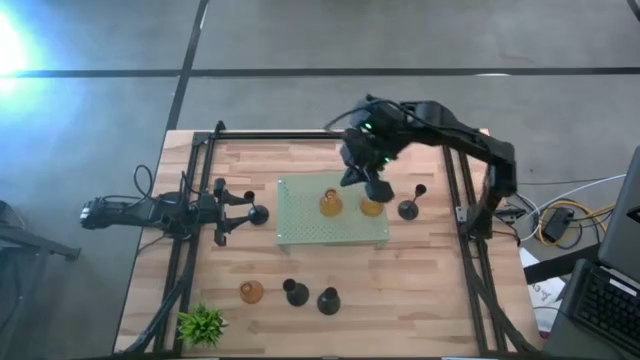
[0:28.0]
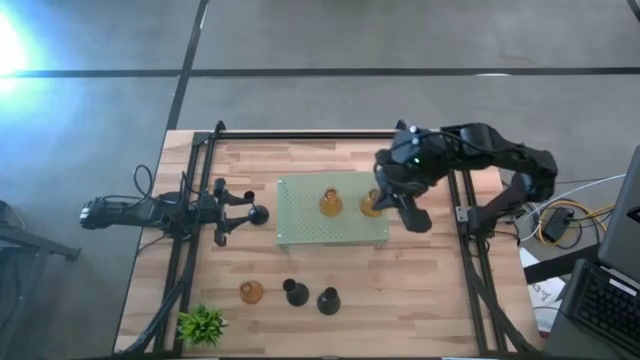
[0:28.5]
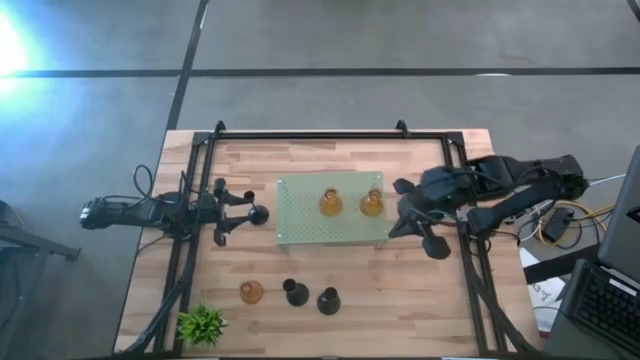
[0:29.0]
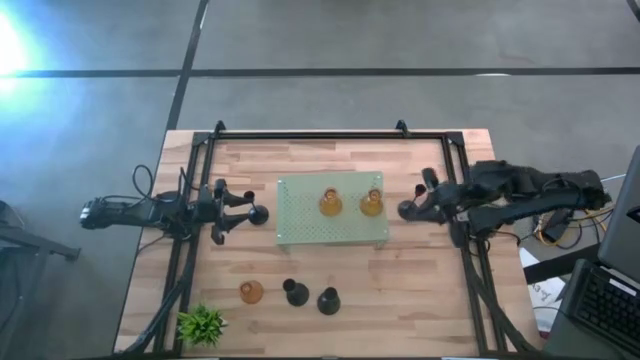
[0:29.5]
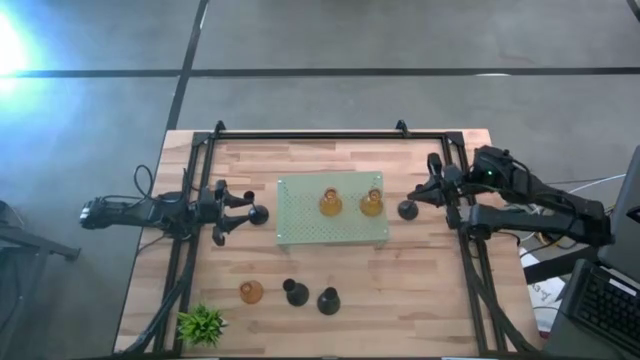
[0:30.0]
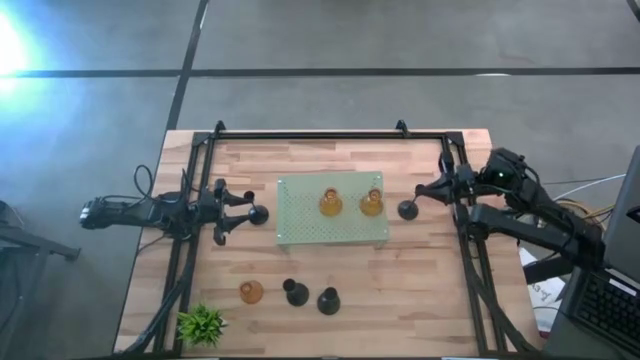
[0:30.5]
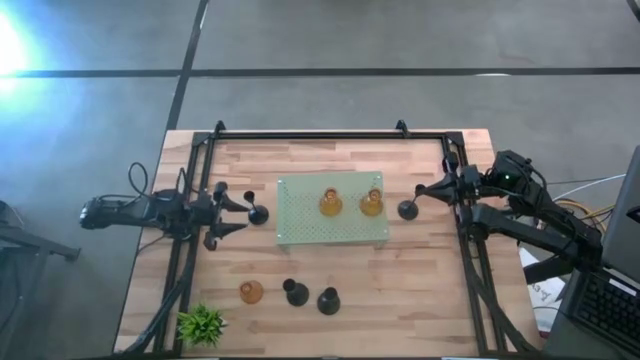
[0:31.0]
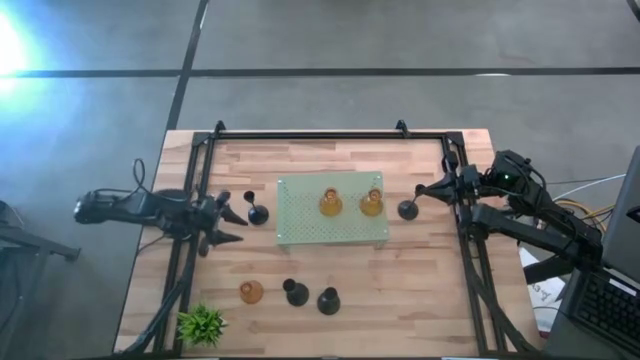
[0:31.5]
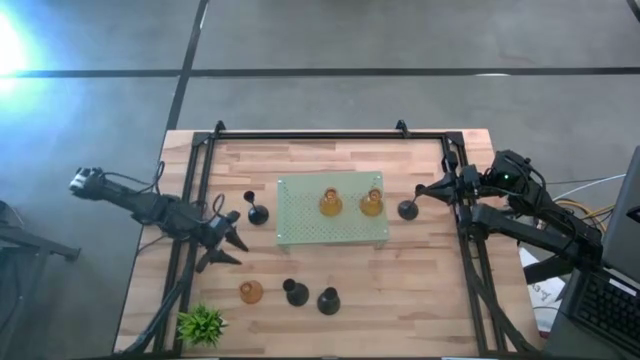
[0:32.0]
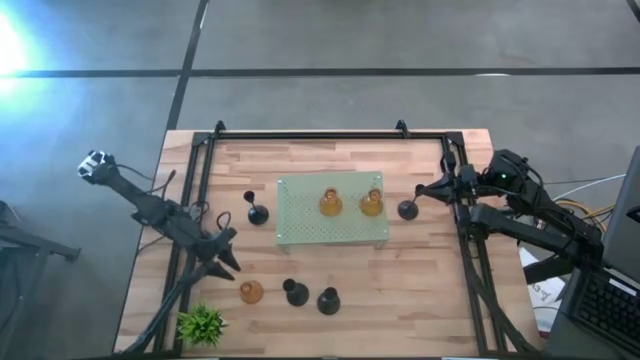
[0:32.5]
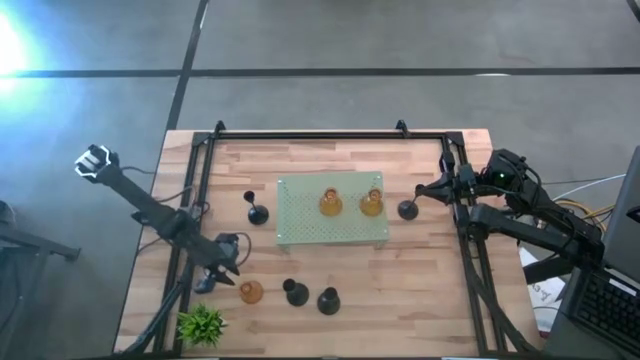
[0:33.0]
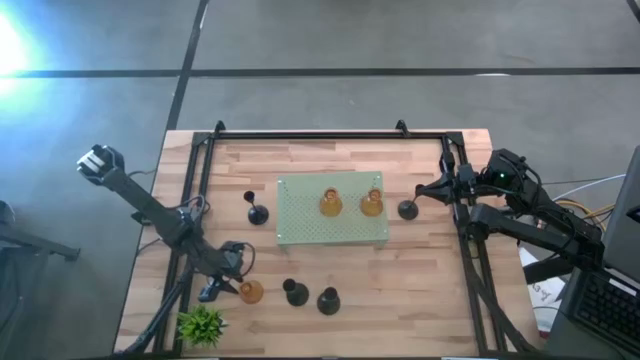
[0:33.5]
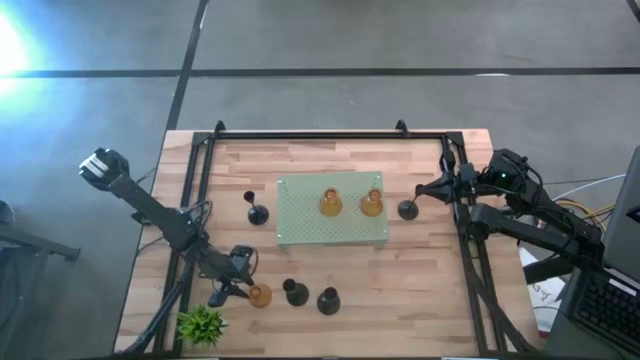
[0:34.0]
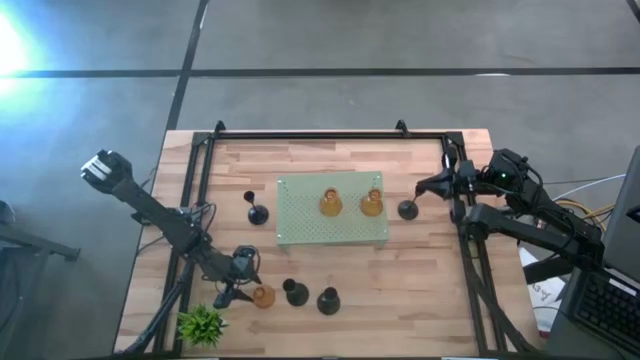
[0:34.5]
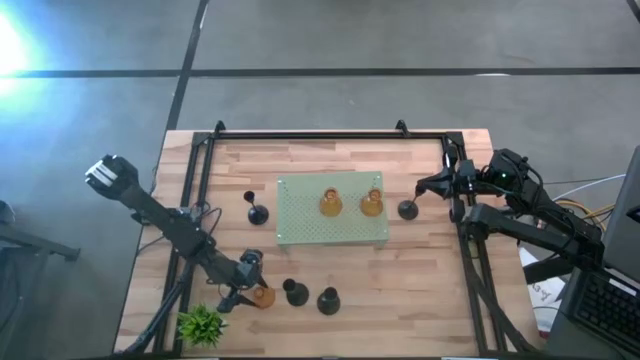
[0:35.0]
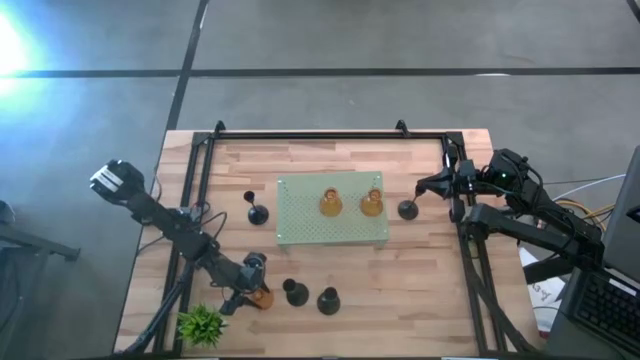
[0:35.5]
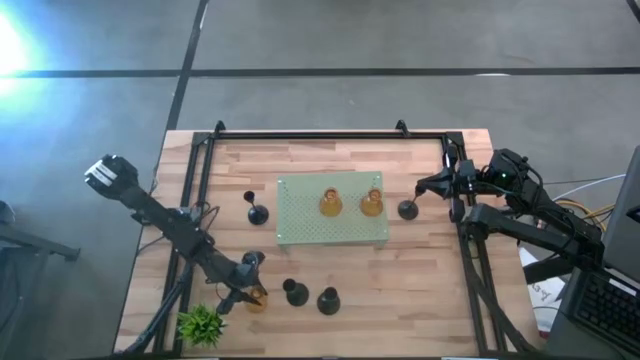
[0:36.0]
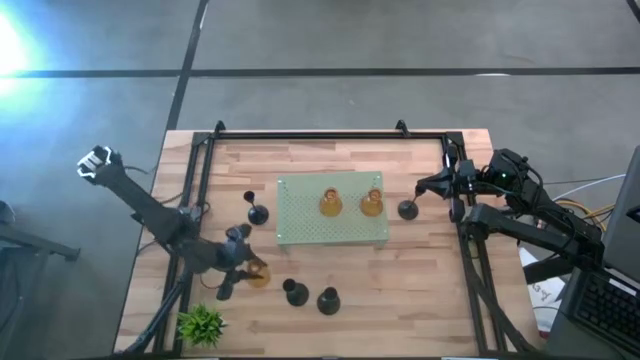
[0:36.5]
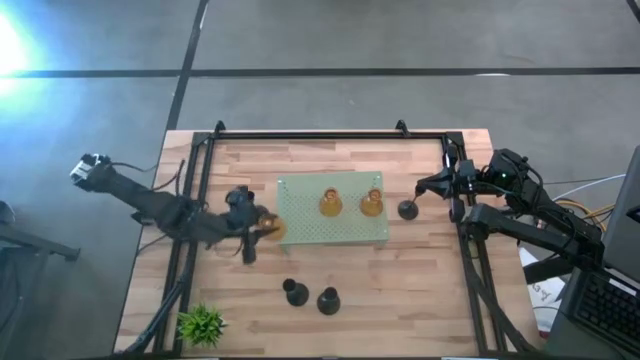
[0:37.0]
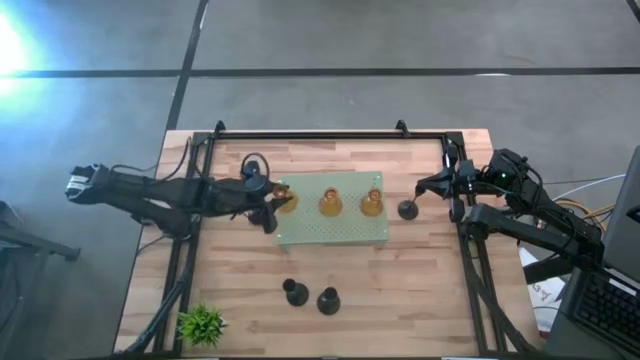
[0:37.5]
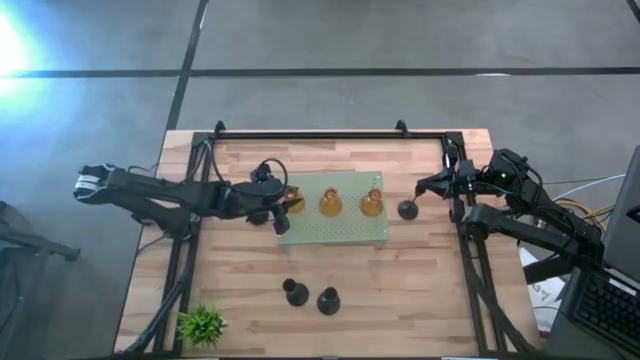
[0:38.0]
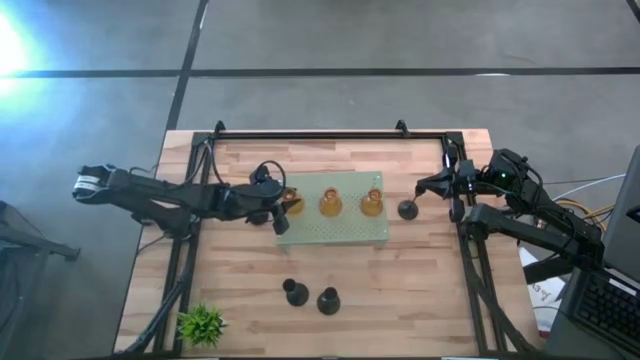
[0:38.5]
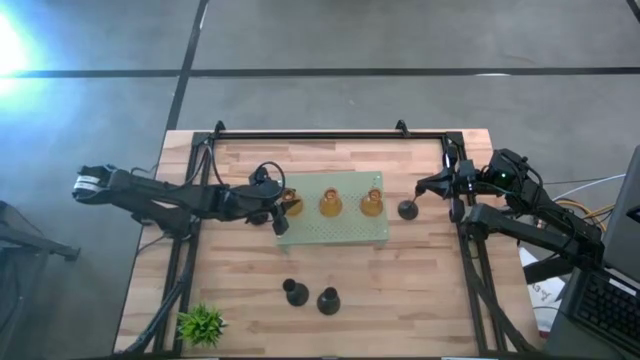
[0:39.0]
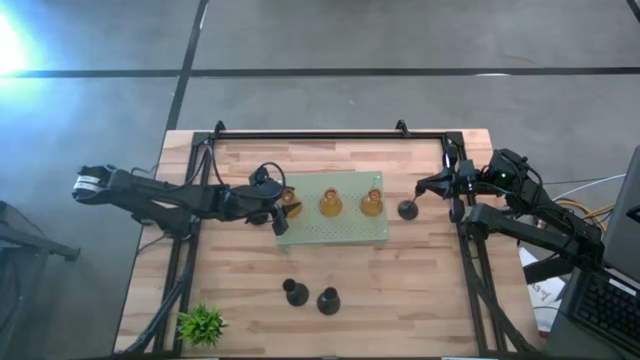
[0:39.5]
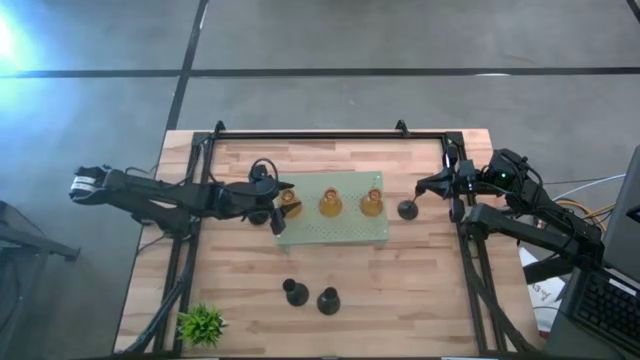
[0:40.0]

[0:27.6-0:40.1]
Task: Pick & Place candle stick holders
Put the yellow glass candle holder on the shelf

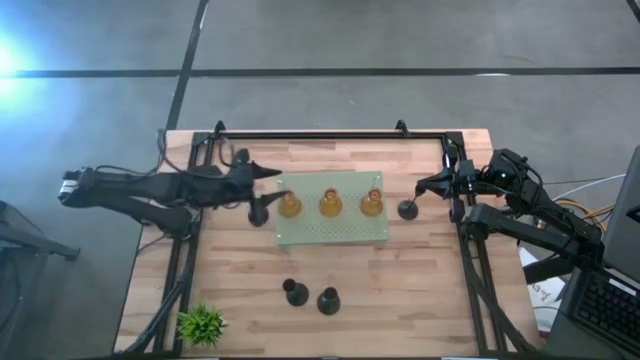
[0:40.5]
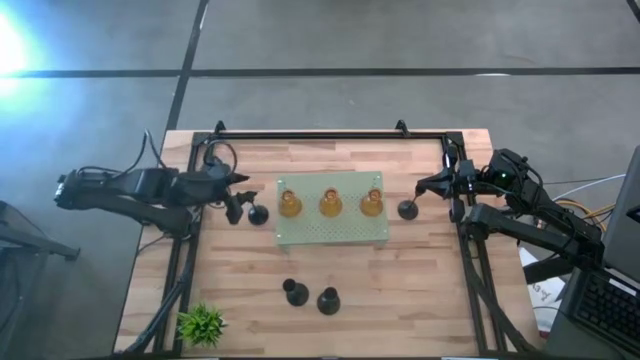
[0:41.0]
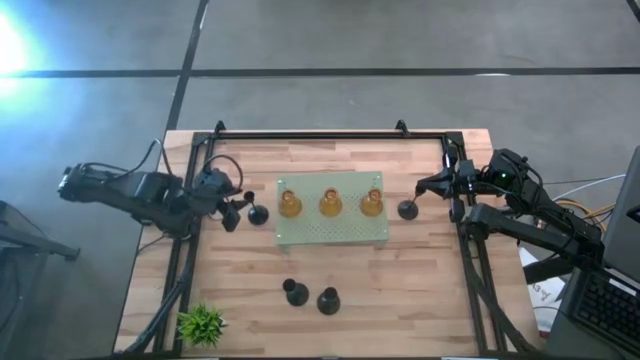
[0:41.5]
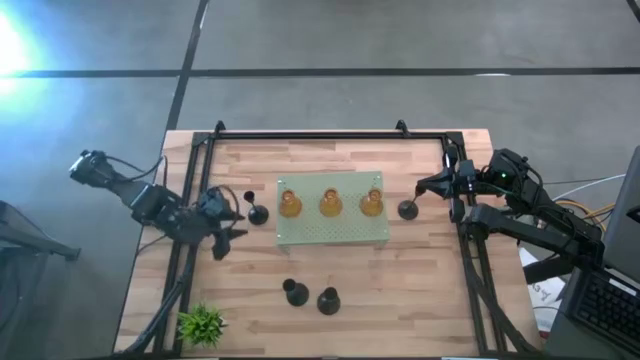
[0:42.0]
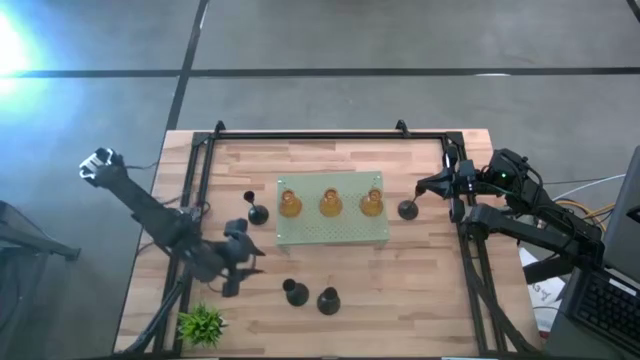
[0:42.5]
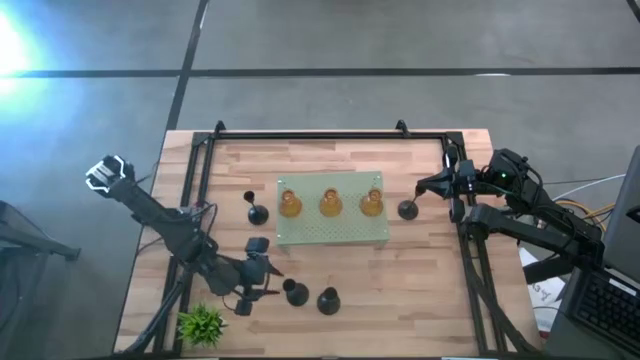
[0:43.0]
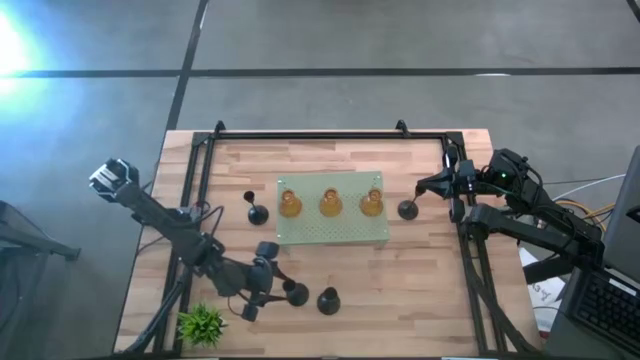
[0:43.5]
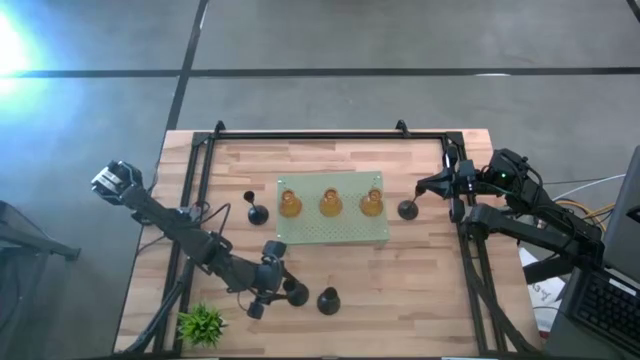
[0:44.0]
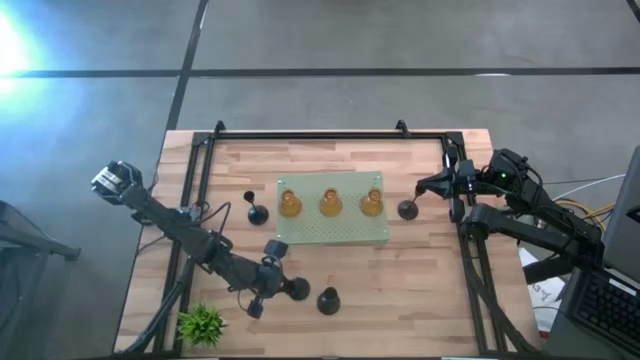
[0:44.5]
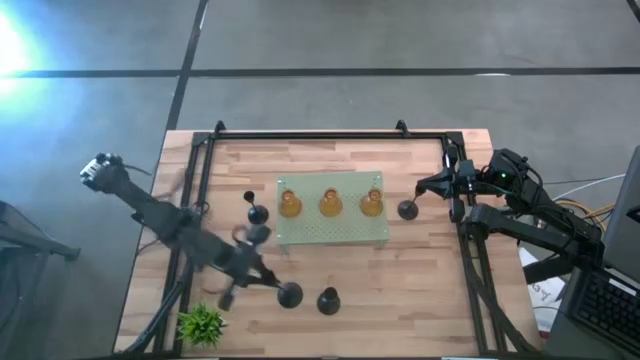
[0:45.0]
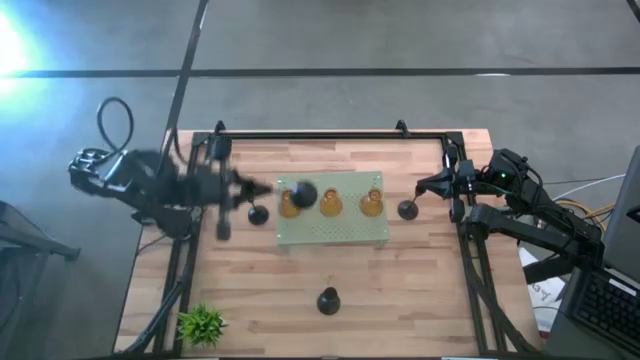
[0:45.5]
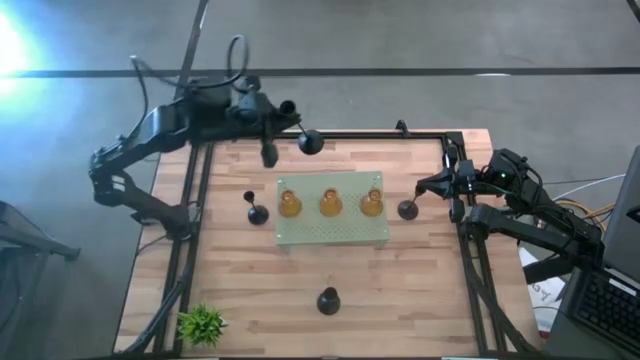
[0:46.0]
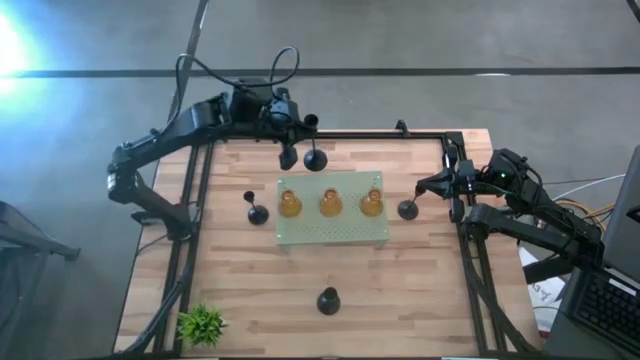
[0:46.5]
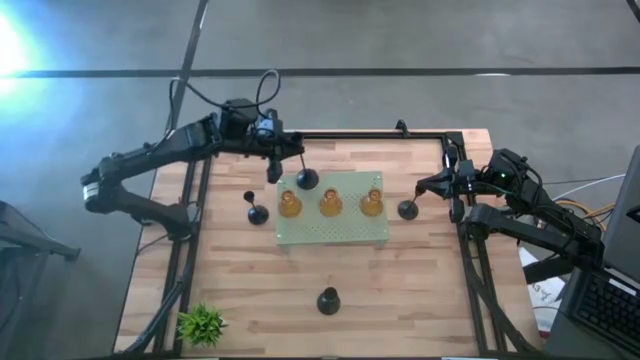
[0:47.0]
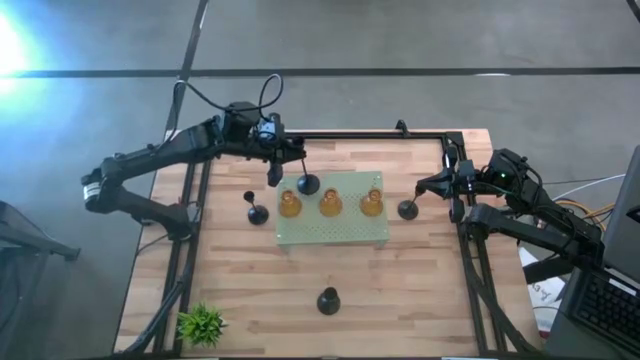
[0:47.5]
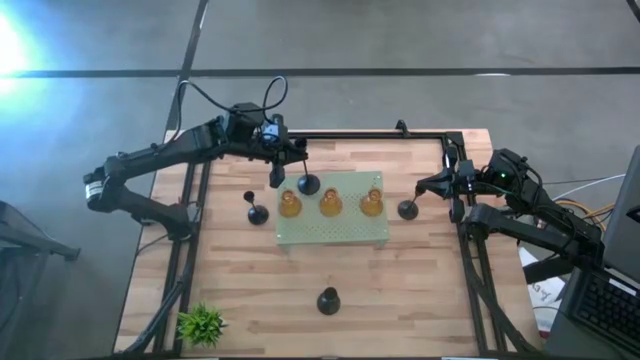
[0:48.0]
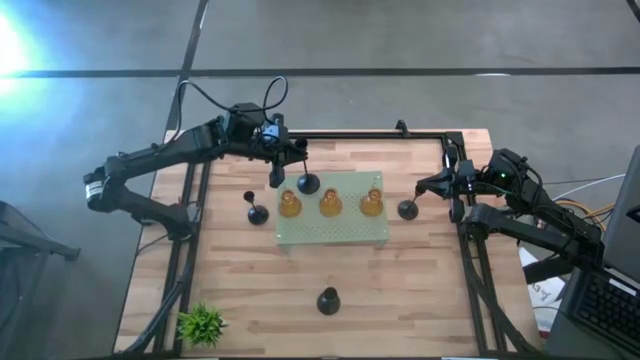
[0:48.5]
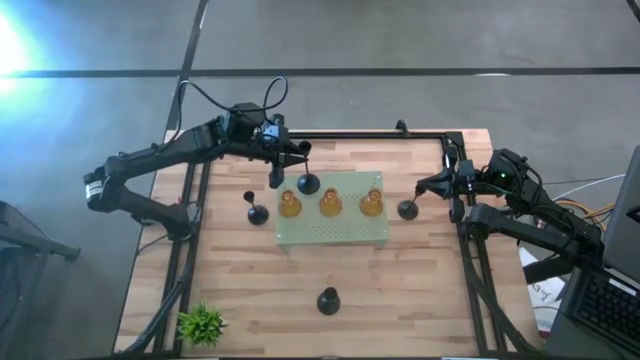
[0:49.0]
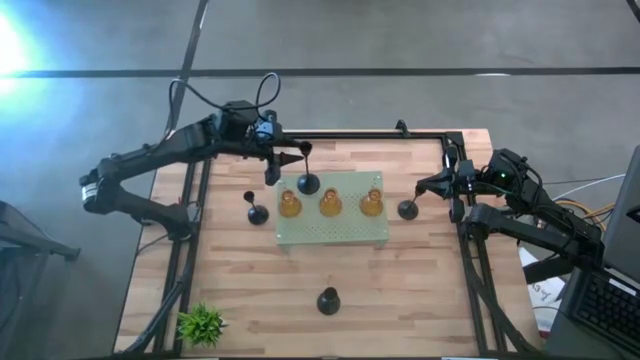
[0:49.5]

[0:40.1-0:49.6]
Put the black candle holder on the shelf
